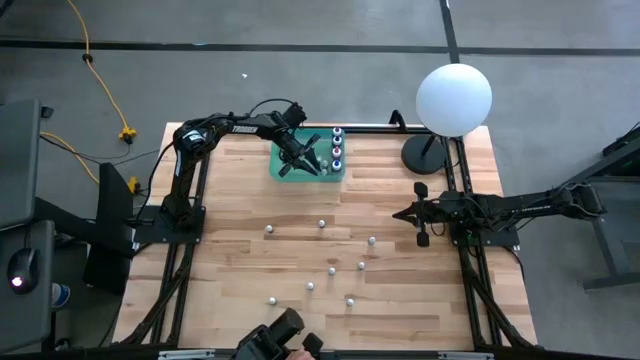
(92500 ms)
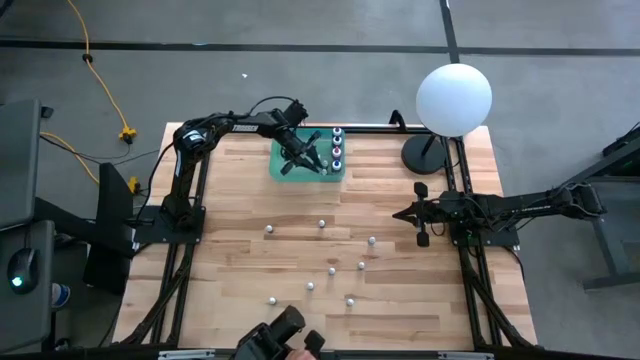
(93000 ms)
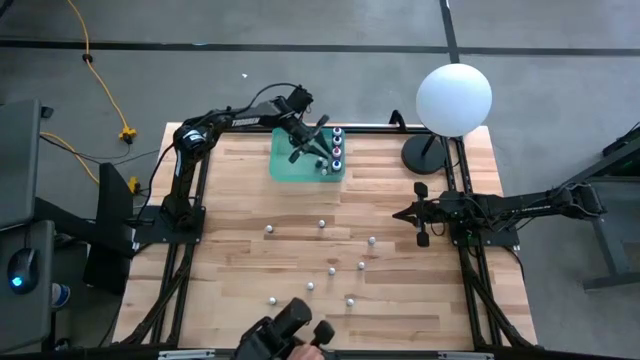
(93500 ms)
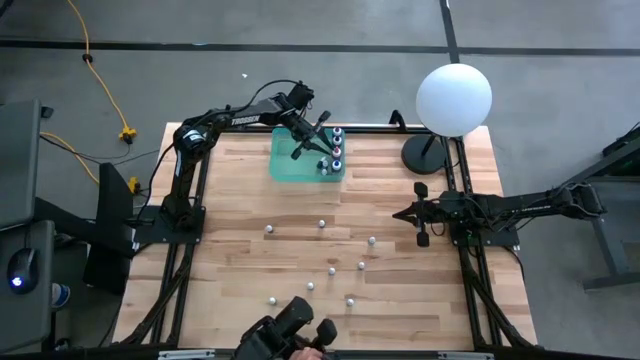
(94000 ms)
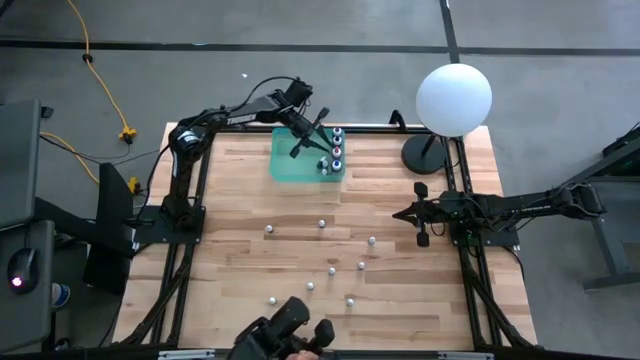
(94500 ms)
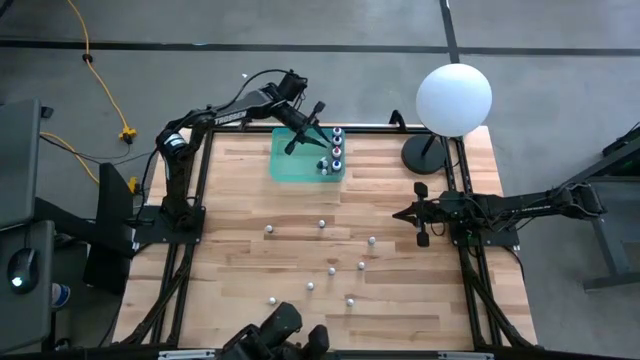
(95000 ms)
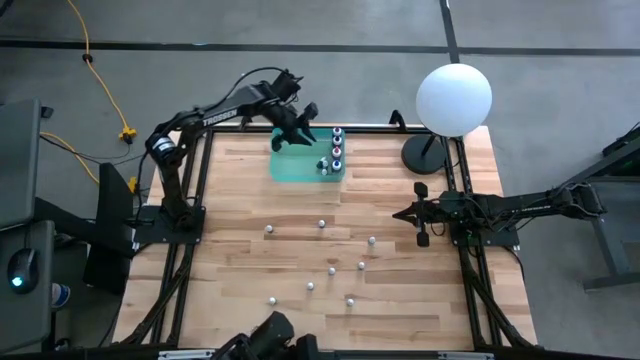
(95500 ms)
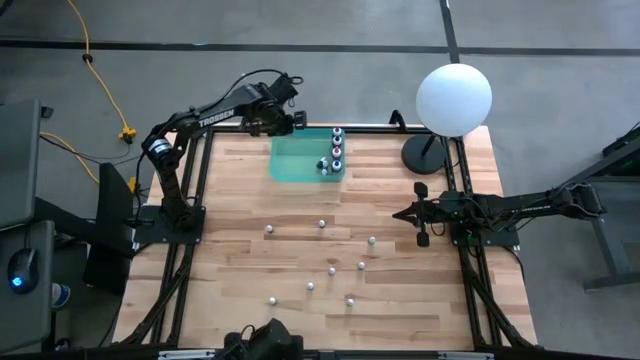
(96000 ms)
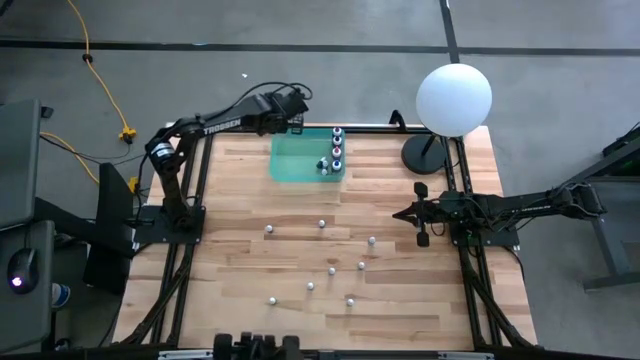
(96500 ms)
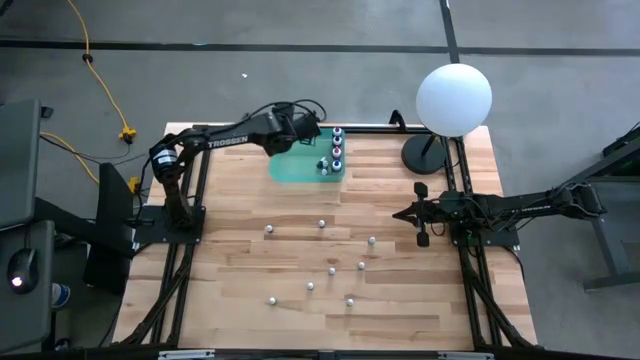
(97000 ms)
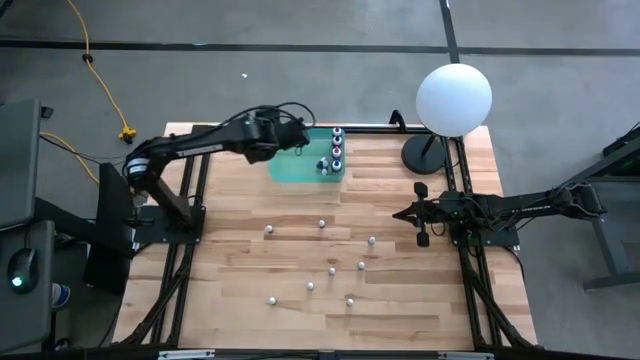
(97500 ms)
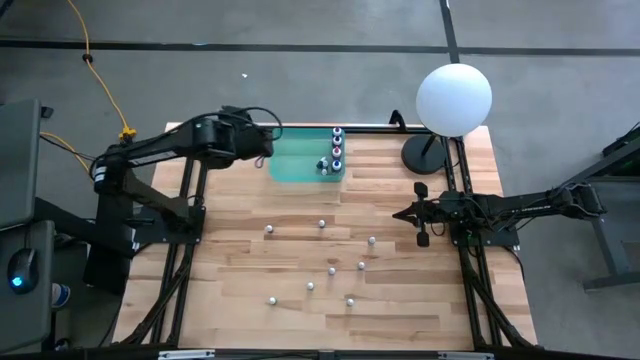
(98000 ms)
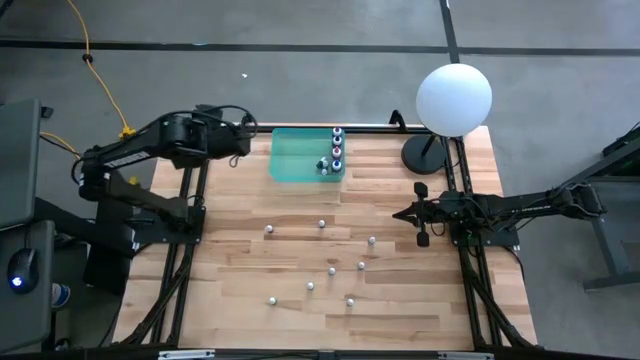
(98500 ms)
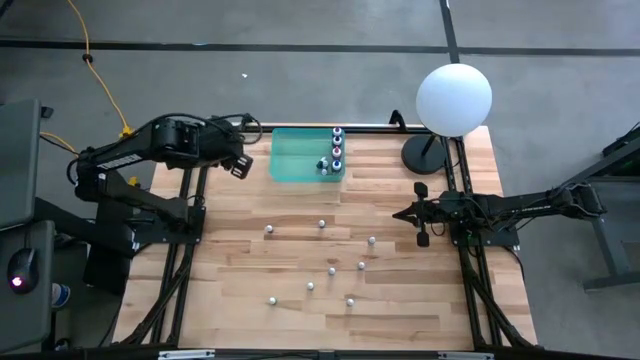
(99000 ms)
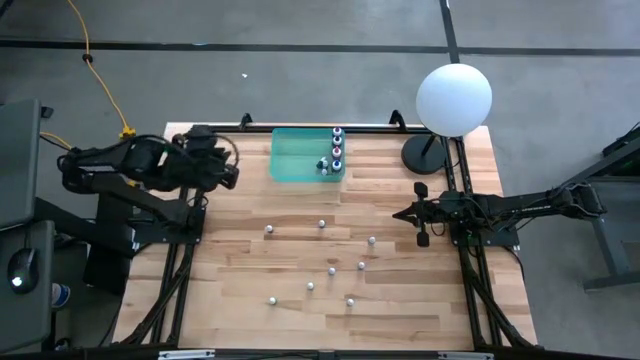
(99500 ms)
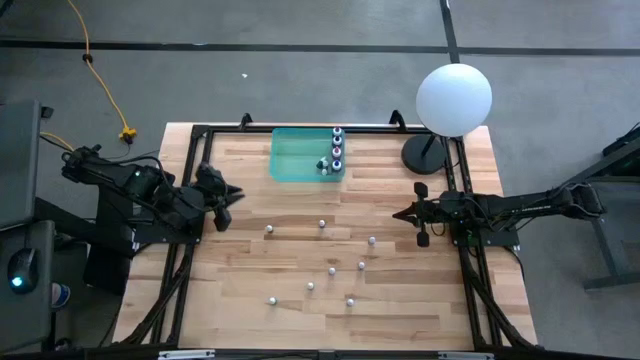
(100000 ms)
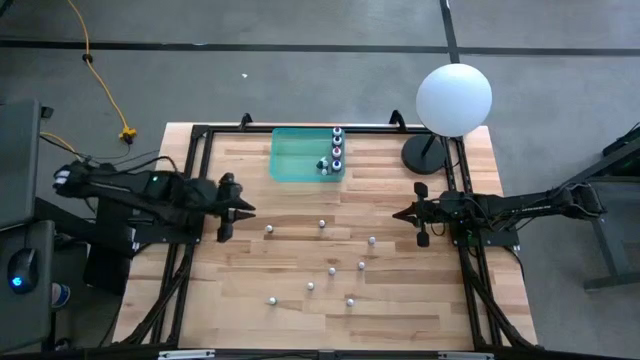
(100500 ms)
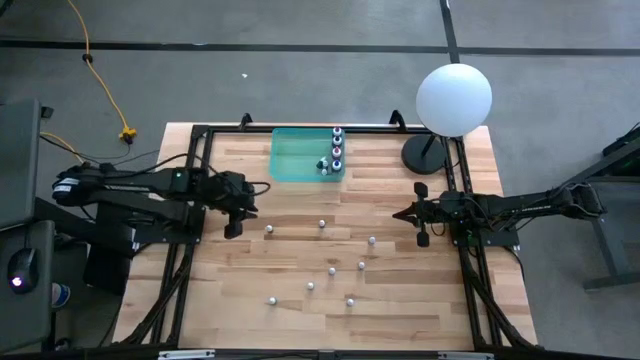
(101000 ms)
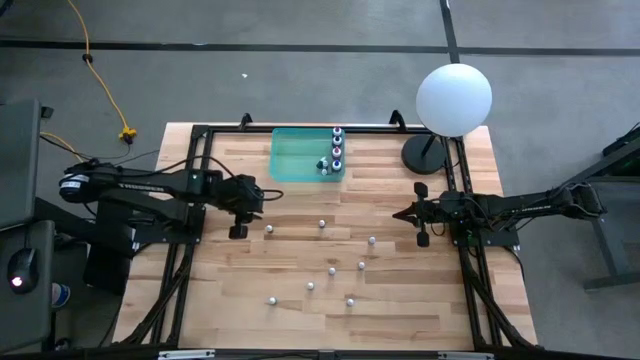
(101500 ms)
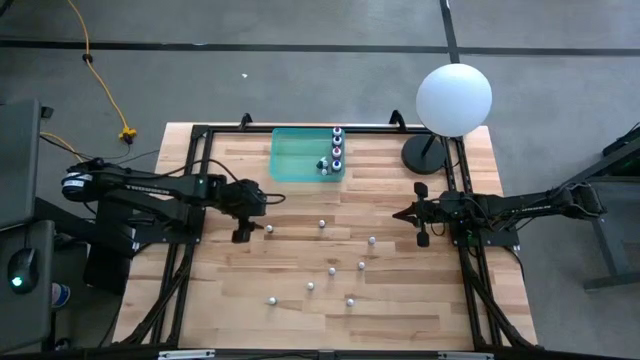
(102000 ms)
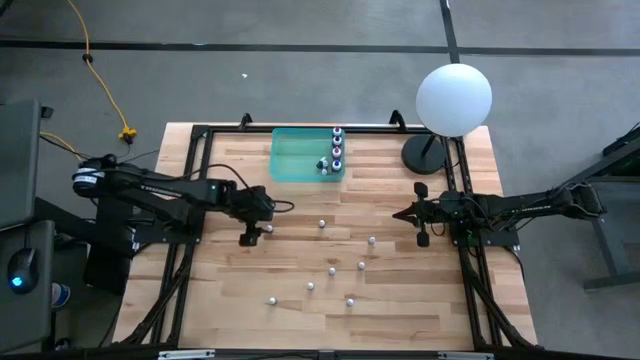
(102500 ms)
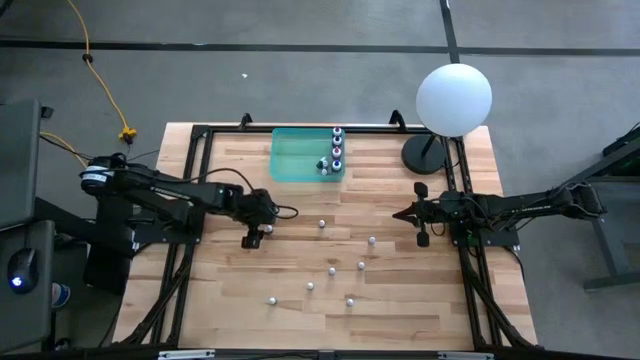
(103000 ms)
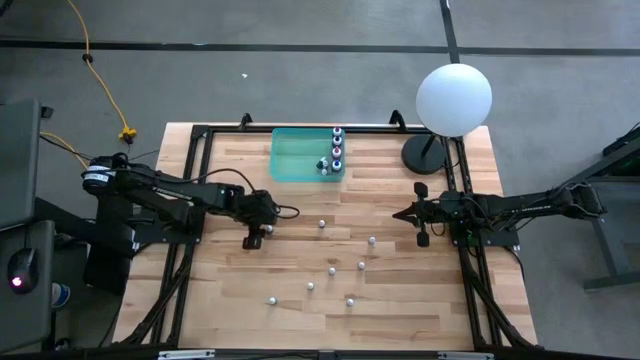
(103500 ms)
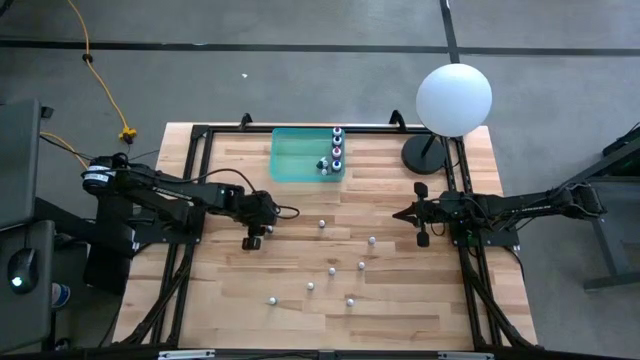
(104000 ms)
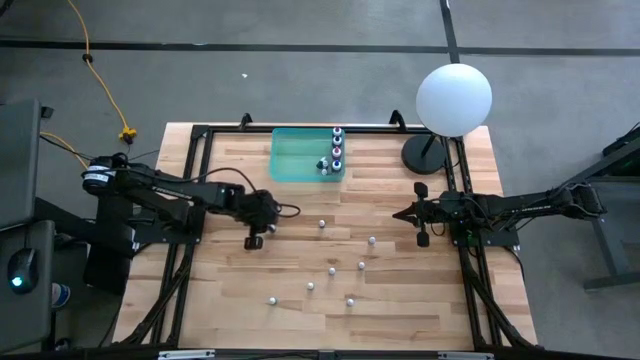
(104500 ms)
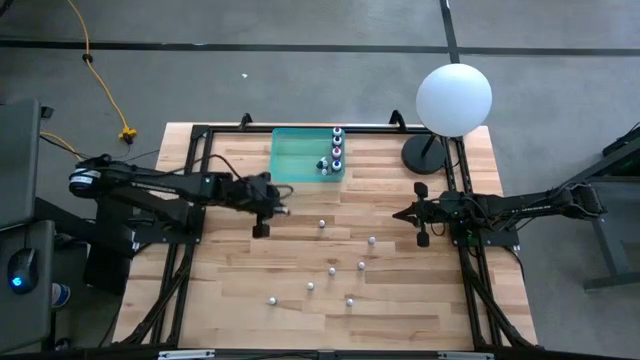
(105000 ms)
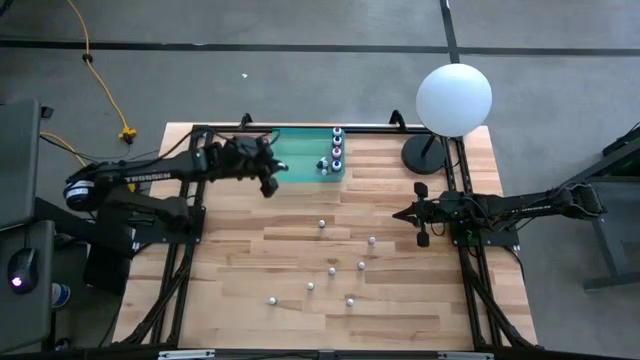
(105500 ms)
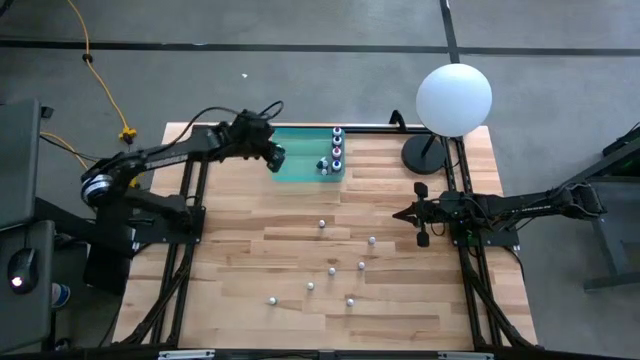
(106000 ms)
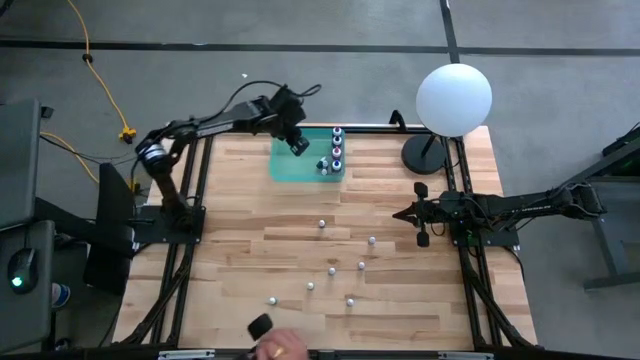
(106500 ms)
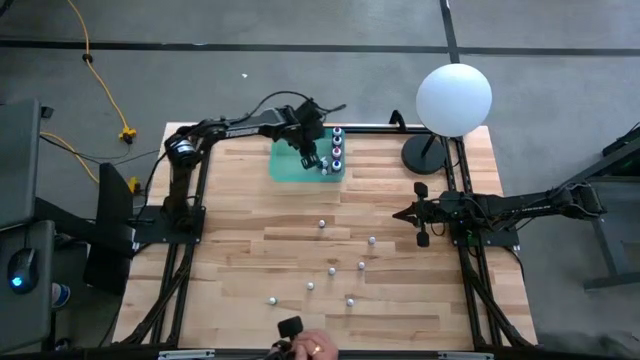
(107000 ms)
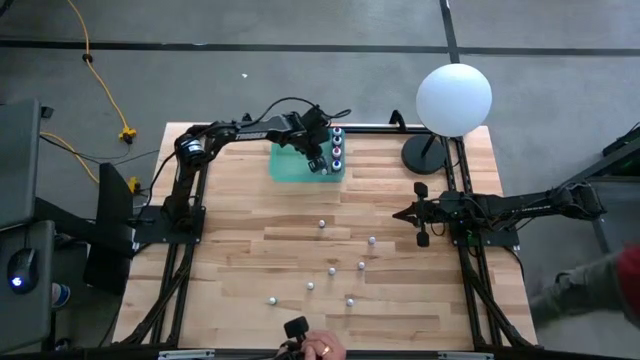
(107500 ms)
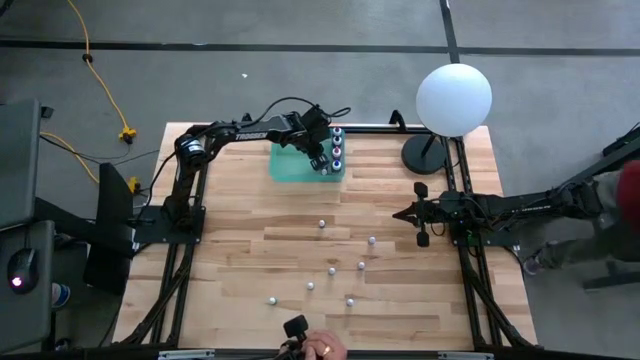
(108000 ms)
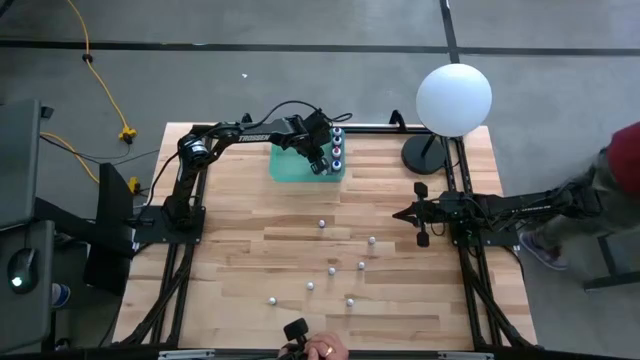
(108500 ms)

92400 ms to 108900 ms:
Task: Pick & Place food coloring
Put the small black food coloring bottle into the blue transparent bin
